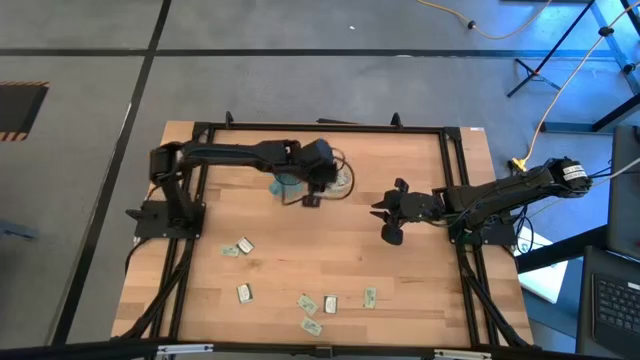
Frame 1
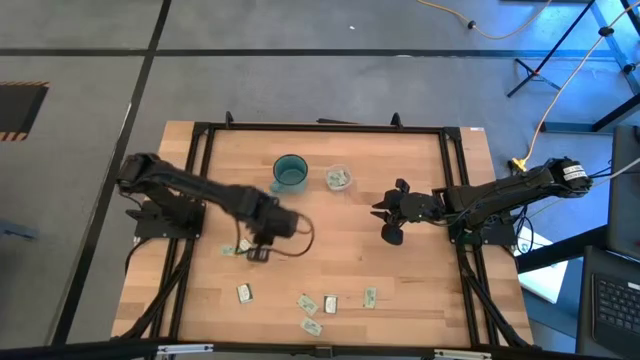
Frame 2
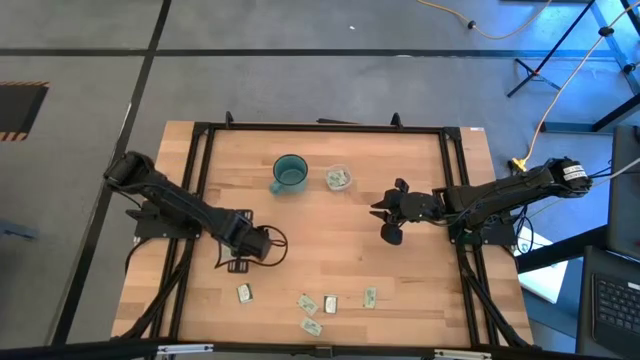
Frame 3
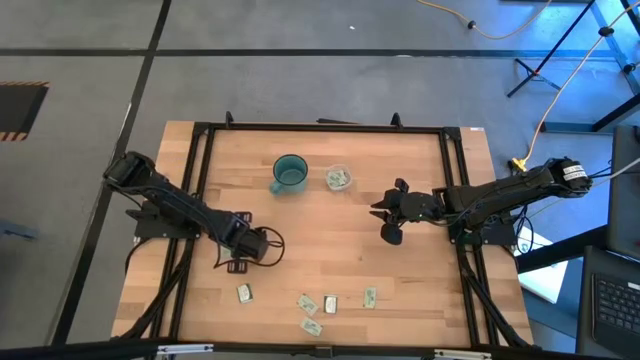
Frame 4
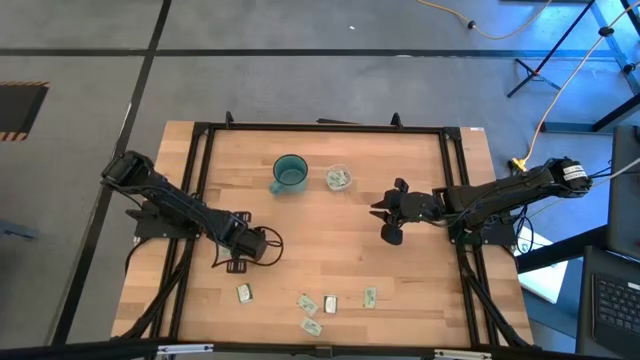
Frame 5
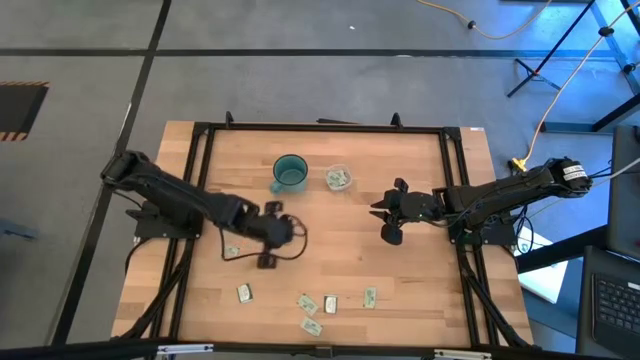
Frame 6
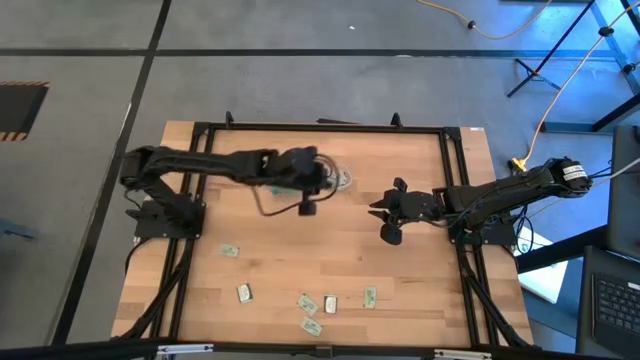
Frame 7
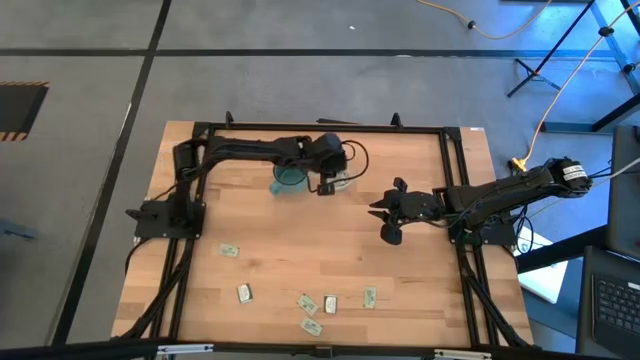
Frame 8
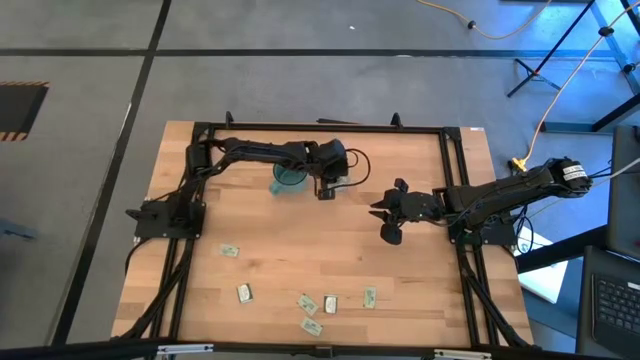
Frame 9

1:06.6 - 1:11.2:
Task: Pick and place items into bin
Put the green stevia packet into the transparent bin

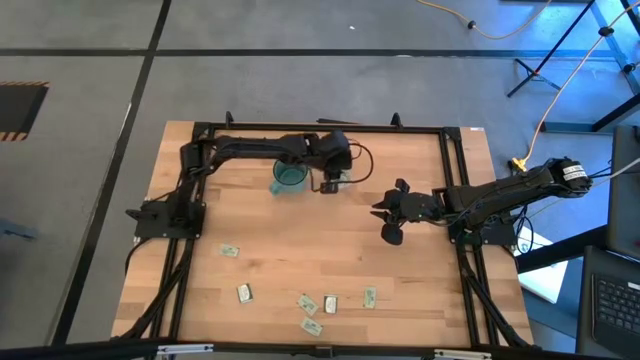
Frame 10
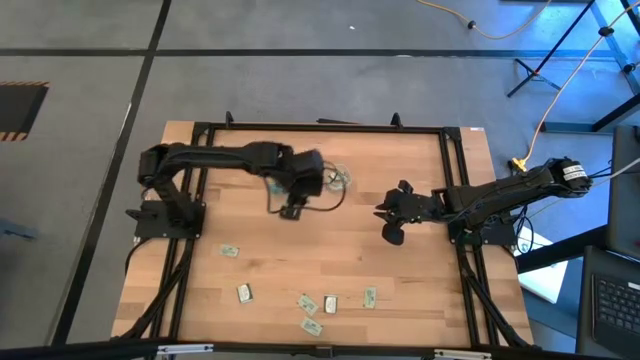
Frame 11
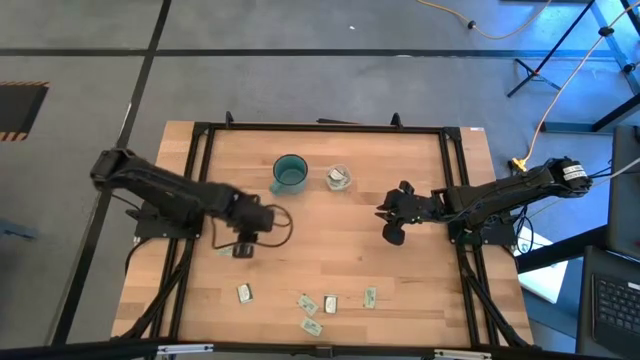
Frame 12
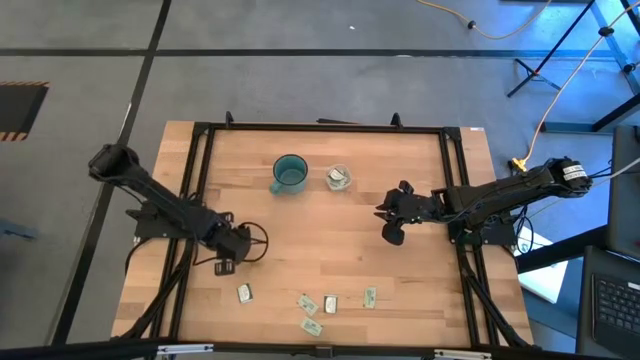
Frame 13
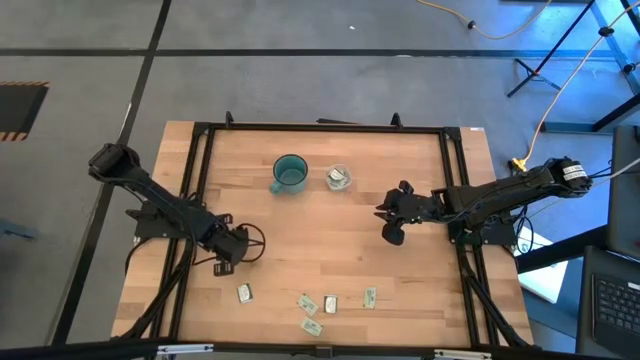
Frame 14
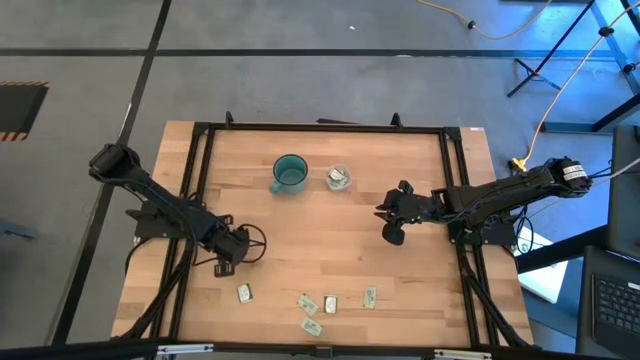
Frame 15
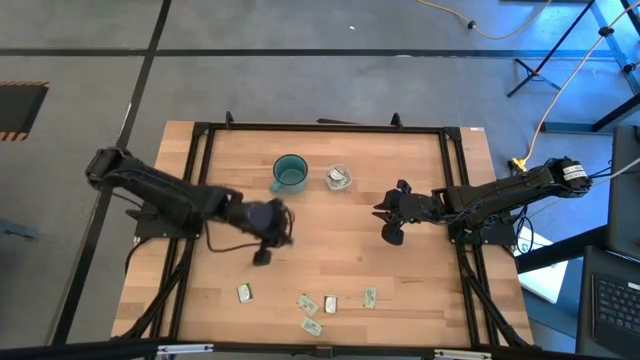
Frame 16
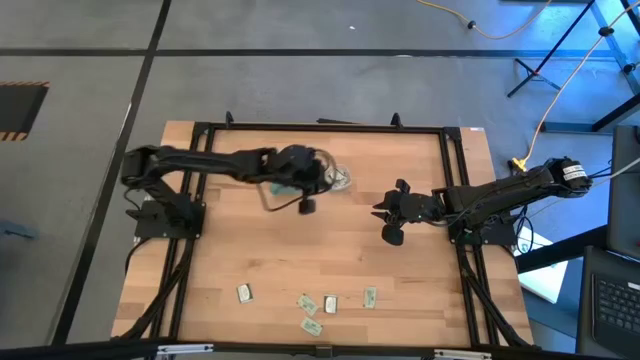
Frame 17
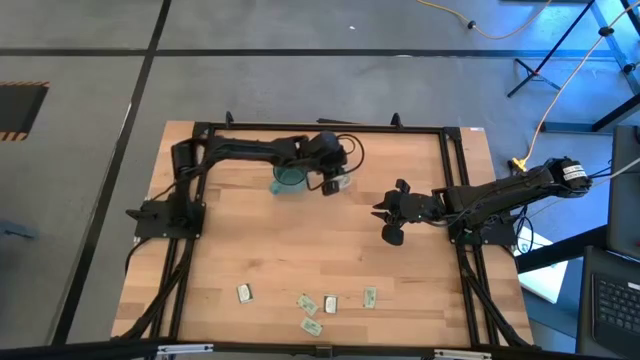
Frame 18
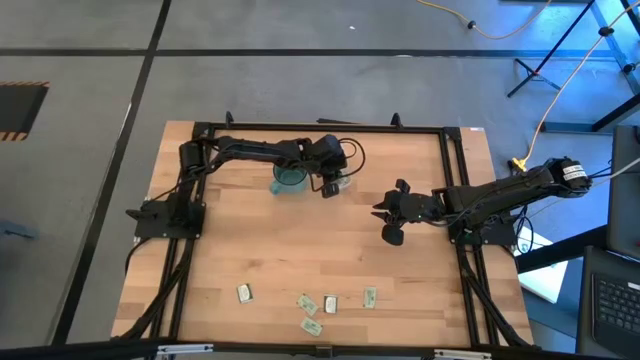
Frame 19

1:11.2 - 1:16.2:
Put the white stevia packet into the transparent bin

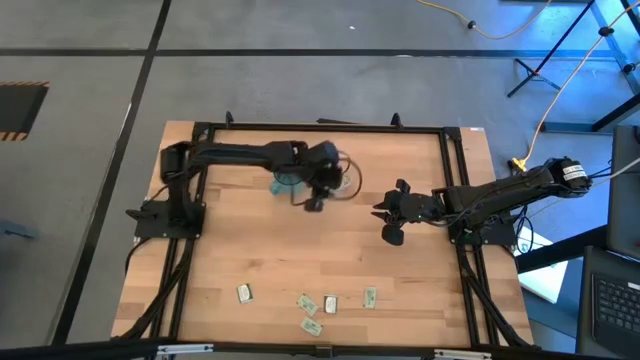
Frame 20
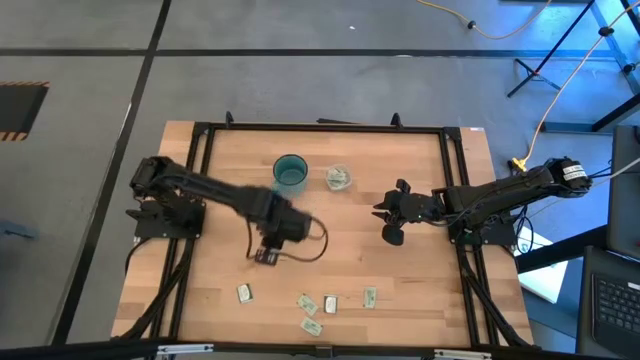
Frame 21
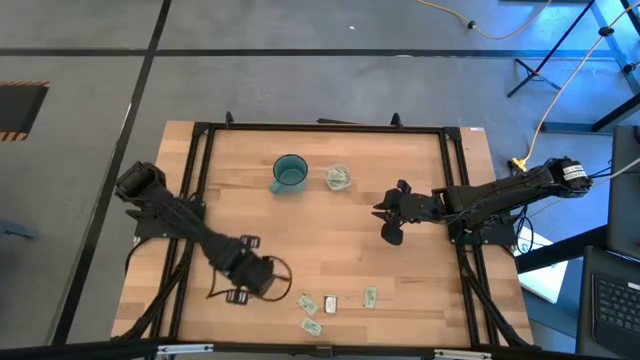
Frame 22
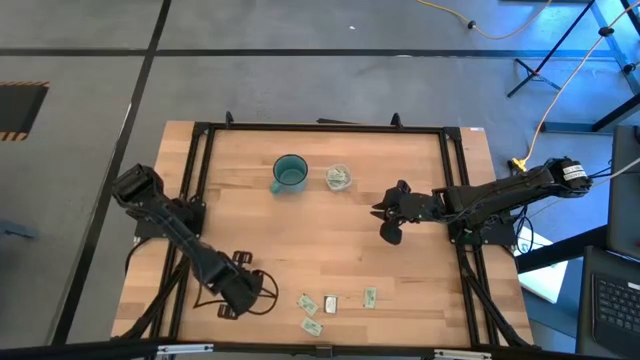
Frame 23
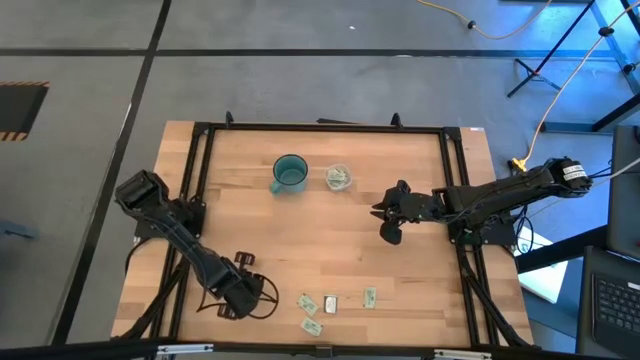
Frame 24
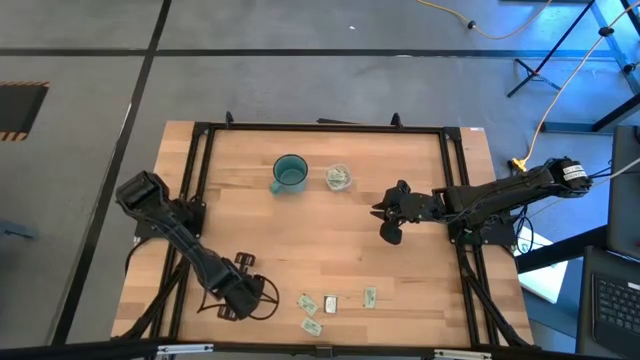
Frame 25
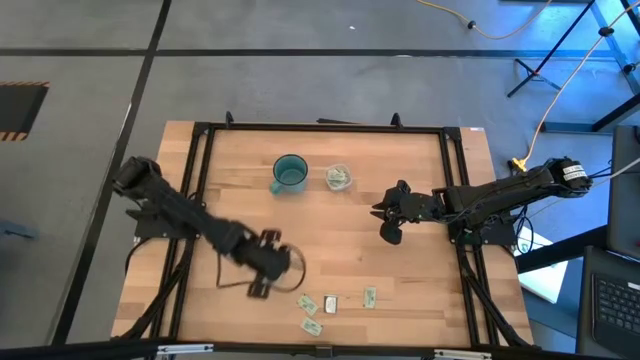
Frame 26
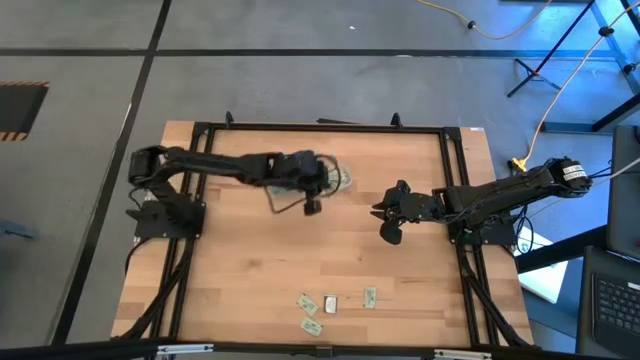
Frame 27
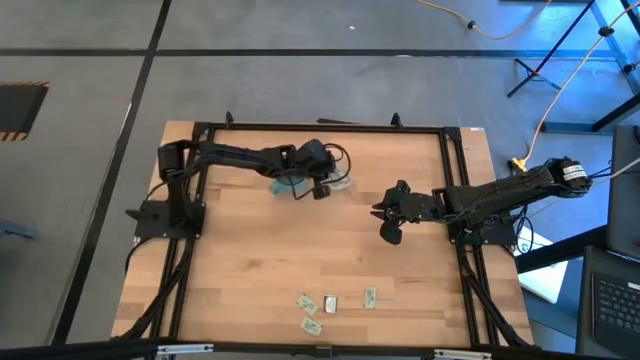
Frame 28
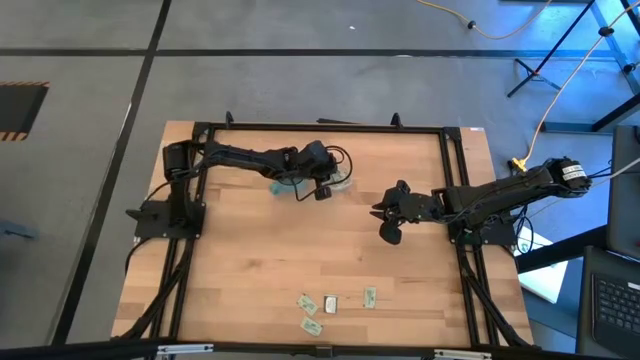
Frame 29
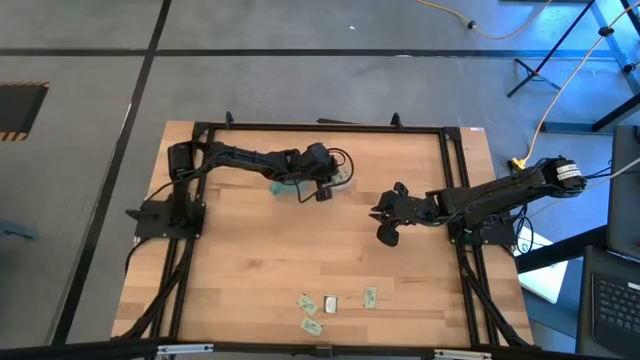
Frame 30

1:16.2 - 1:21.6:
Put the green stevia packet into the transparent bin

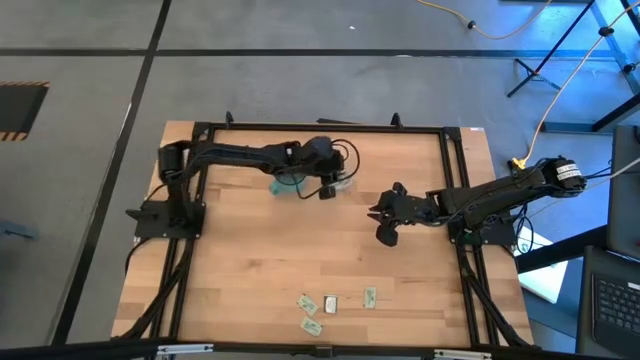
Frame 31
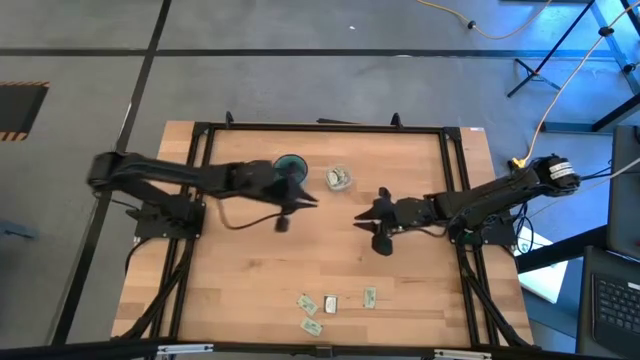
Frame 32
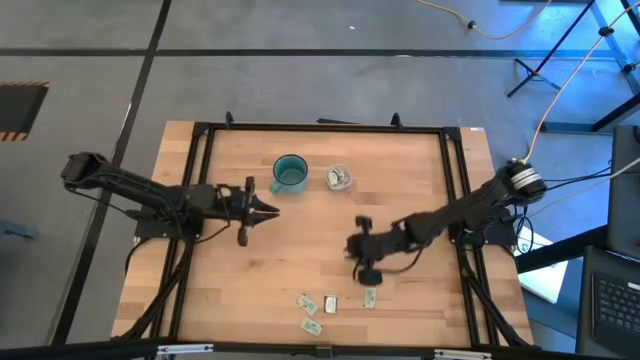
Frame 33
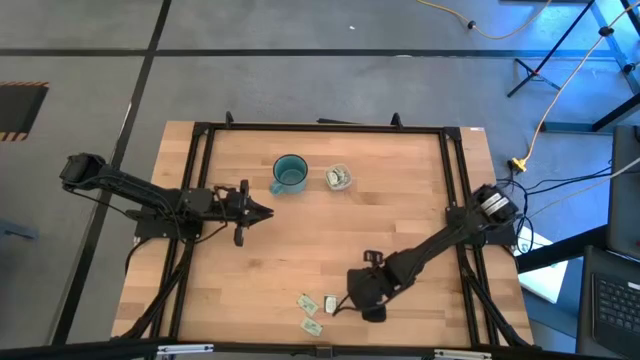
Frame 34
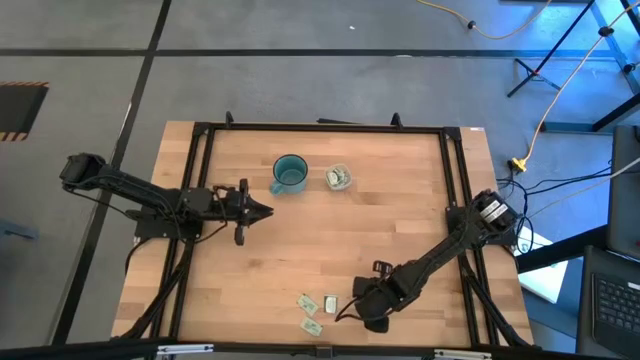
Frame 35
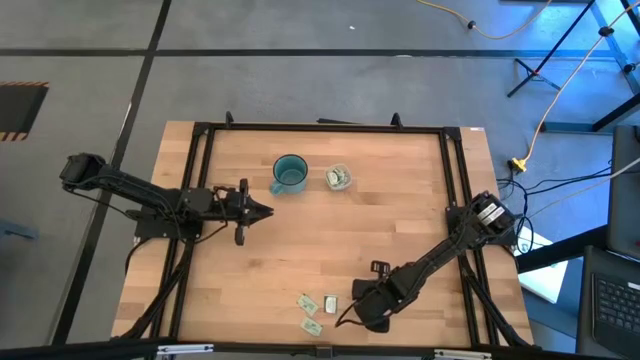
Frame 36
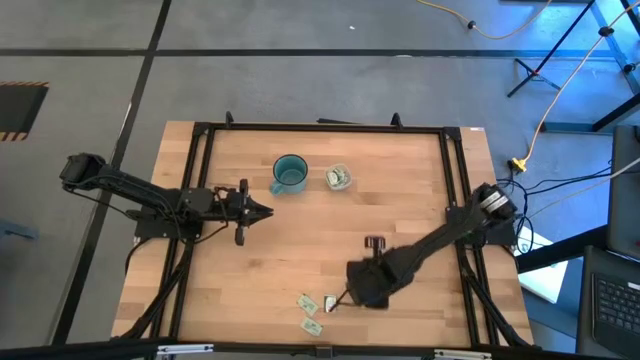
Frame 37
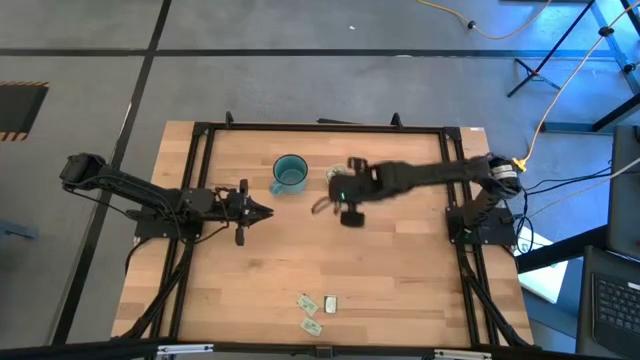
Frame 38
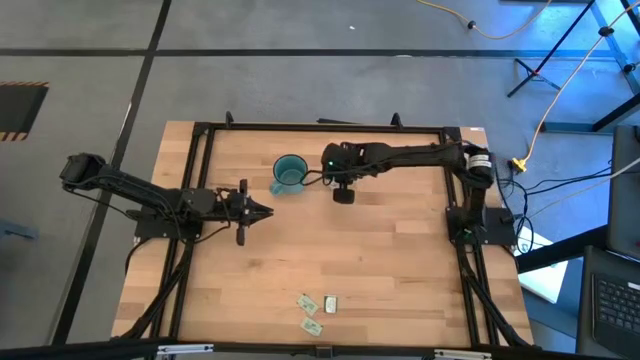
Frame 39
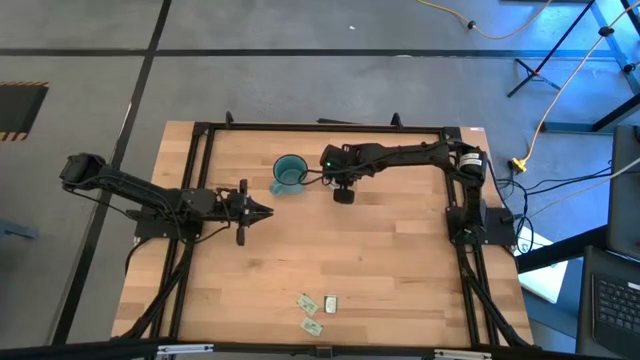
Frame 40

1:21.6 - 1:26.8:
Put the white stevia packet into the transparent bin

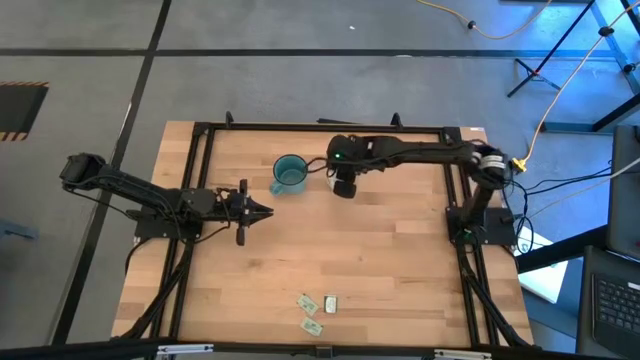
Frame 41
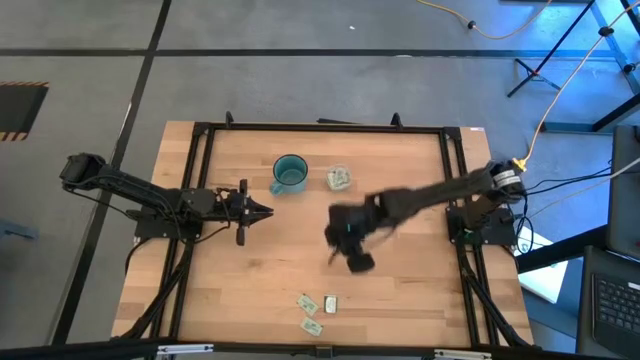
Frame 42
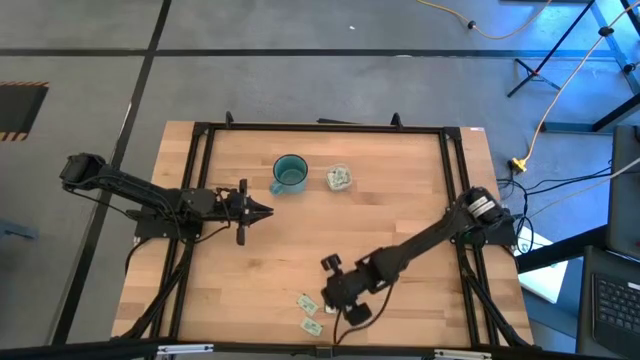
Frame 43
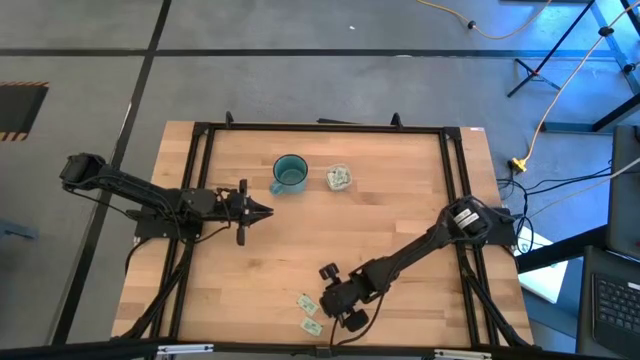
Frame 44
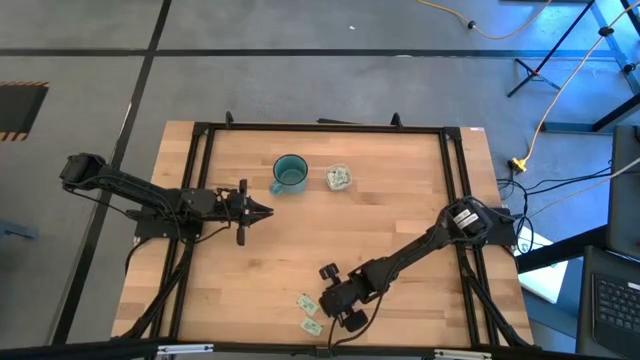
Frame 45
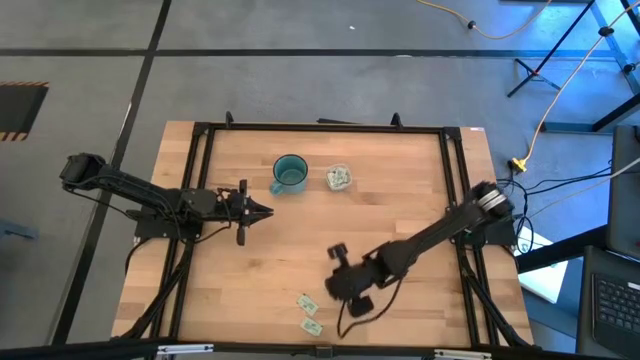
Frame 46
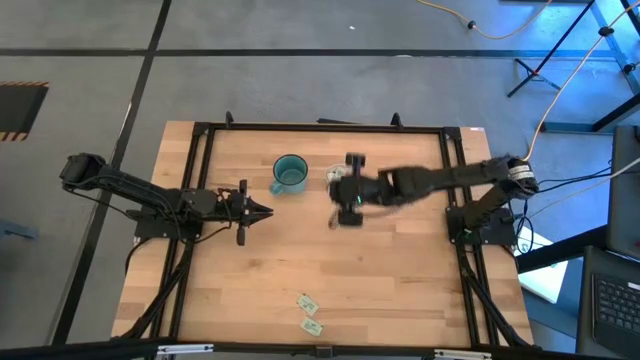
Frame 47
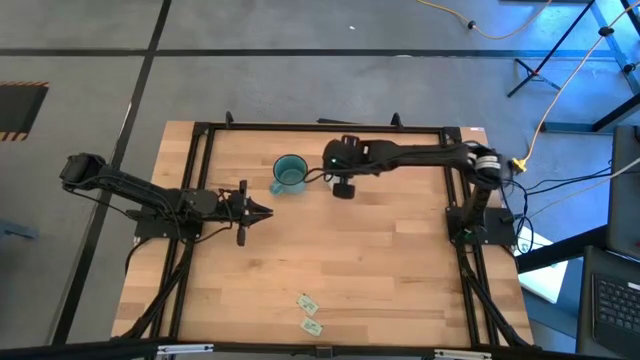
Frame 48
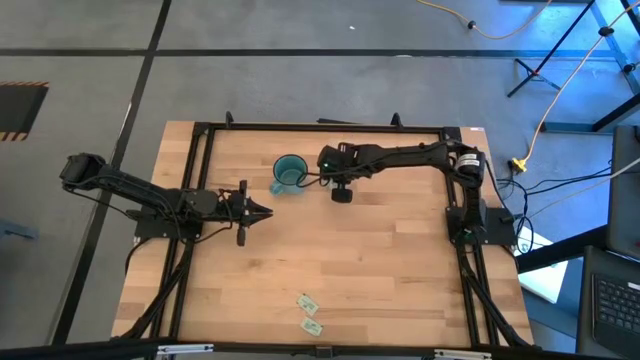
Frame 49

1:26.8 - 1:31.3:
Put the green stevia packet into the transparent bin
